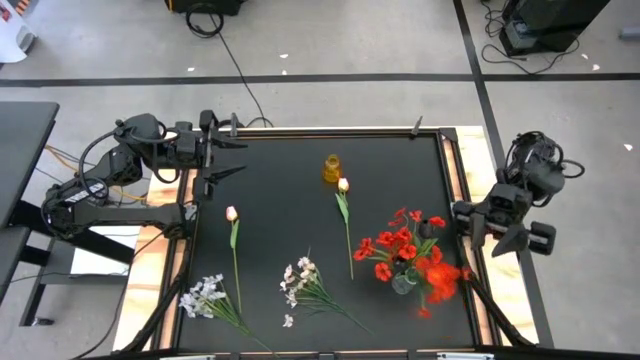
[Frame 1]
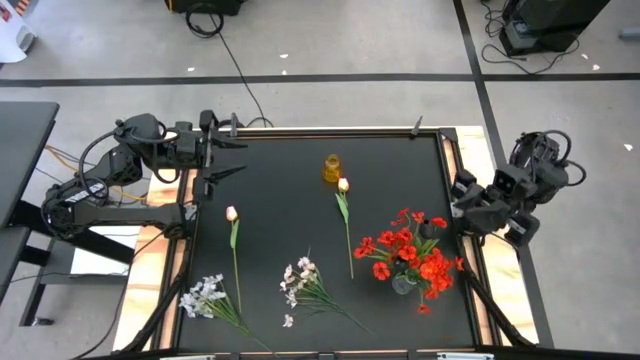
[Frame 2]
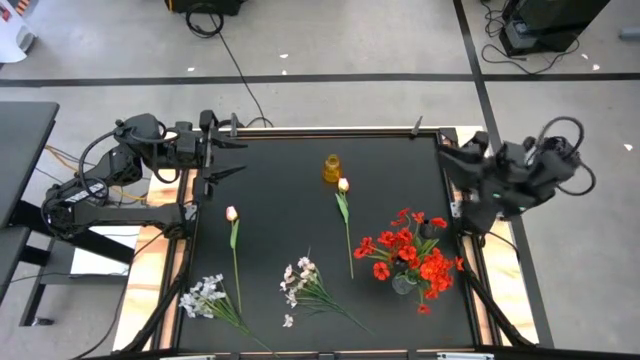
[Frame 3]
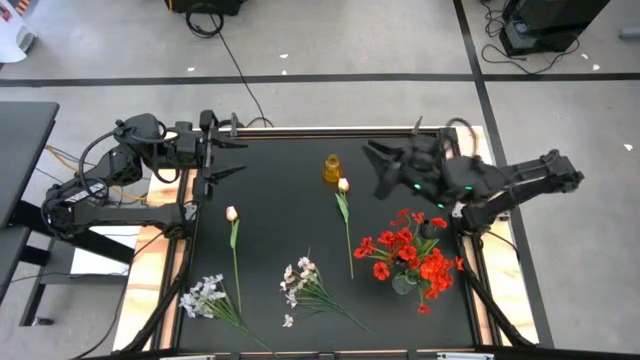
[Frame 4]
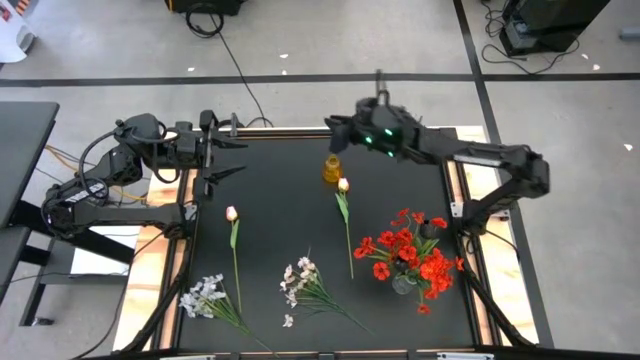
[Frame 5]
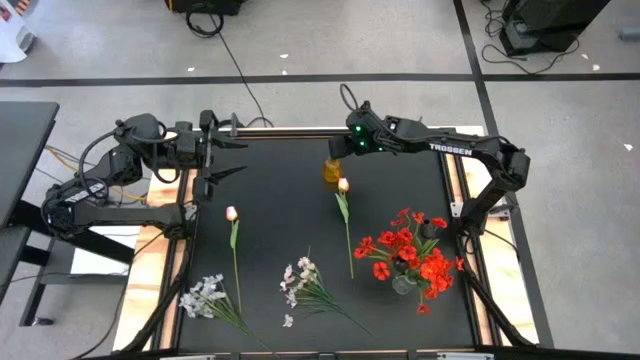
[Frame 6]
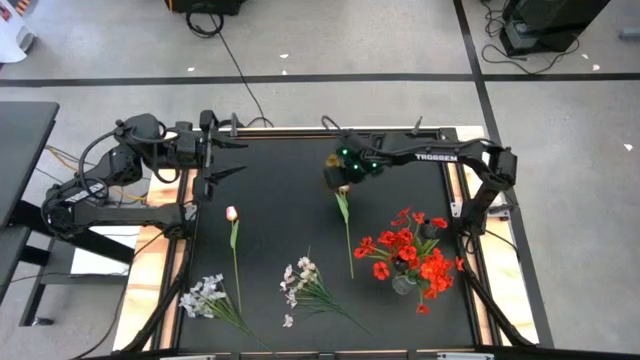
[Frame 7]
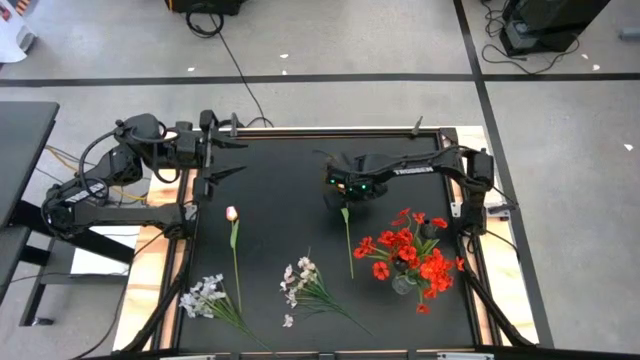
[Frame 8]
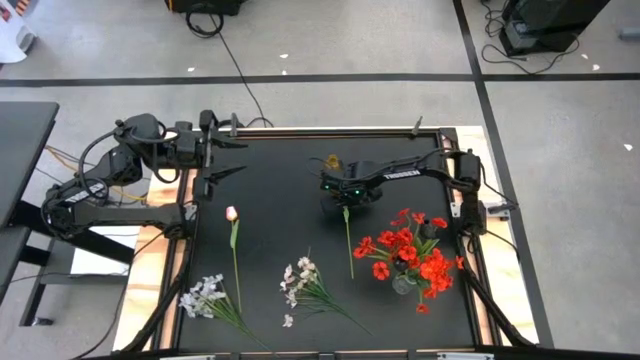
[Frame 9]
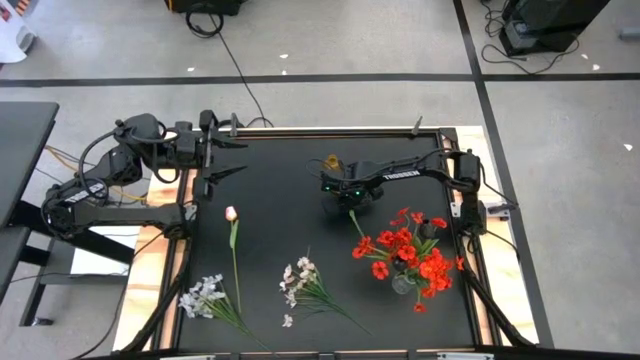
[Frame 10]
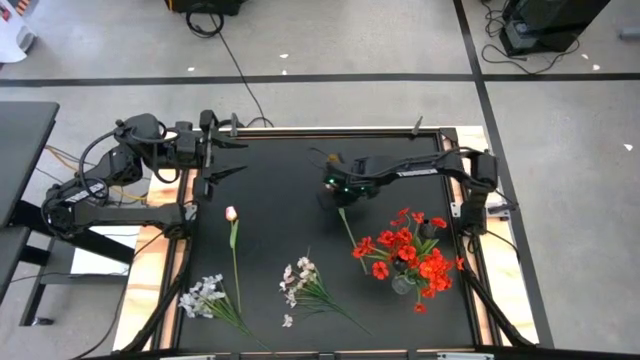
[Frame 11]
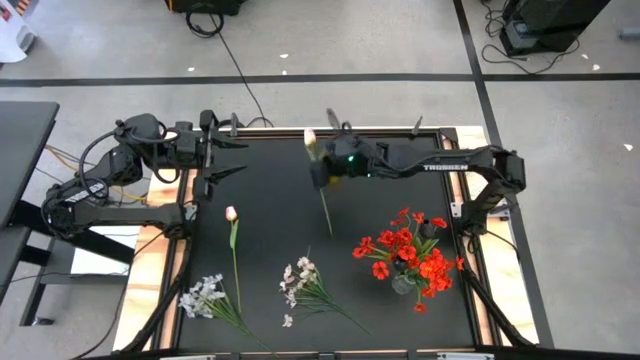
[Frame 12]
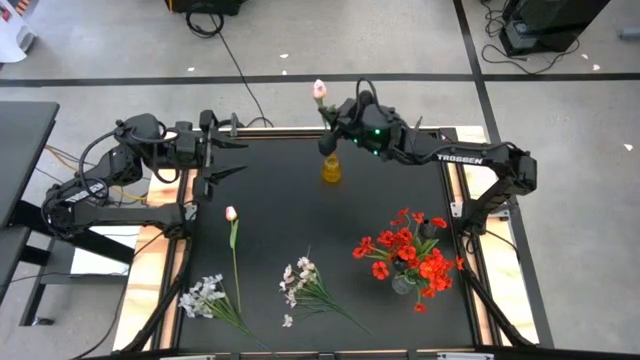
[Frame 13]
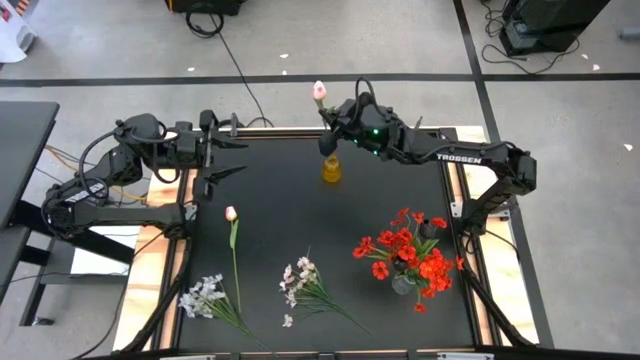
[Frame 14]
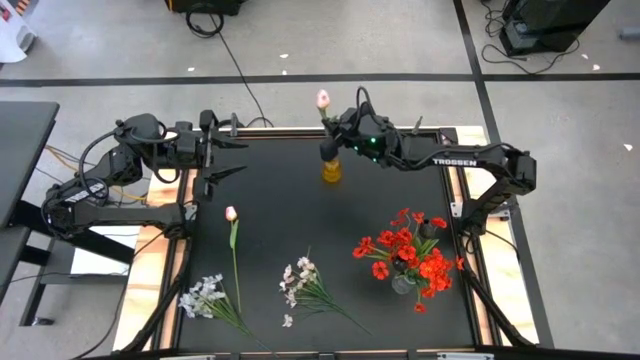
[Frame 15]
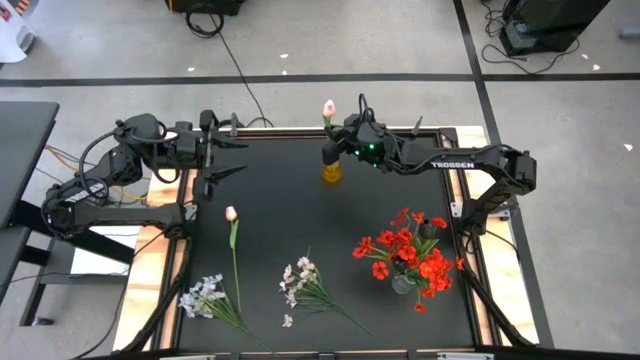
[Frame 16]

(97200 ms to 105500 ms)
Task: Sort flowers into vase by color
Put the right pink flower into the yellow vase

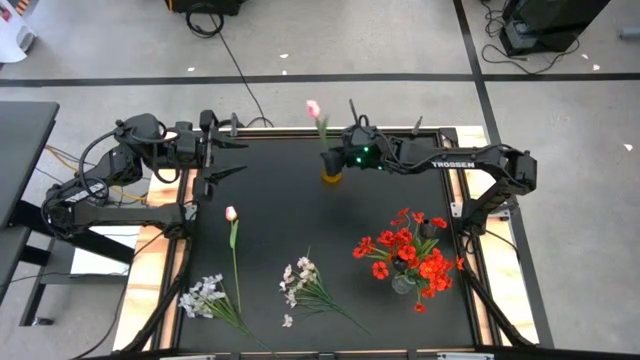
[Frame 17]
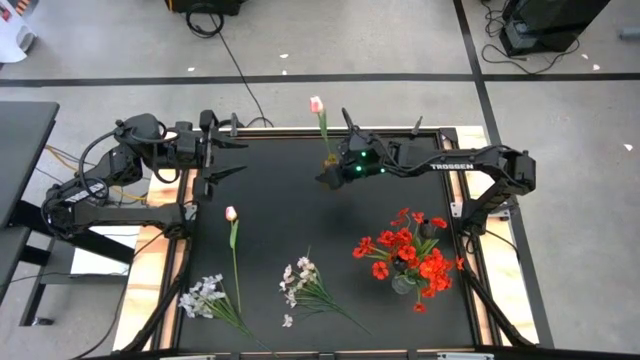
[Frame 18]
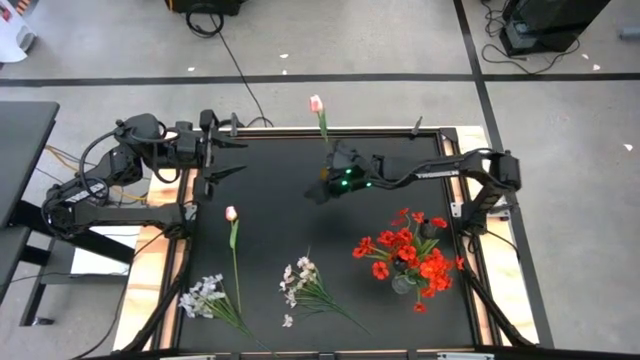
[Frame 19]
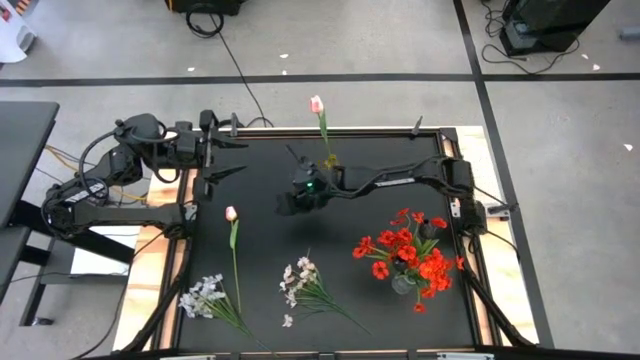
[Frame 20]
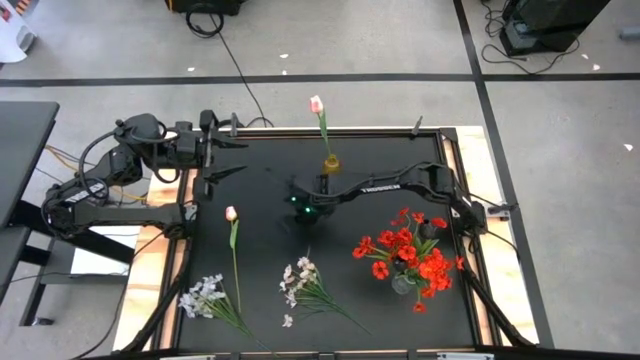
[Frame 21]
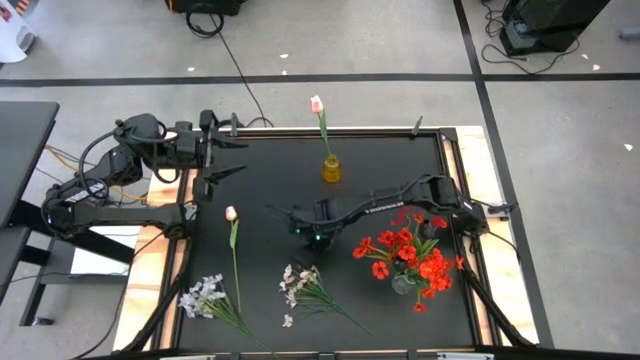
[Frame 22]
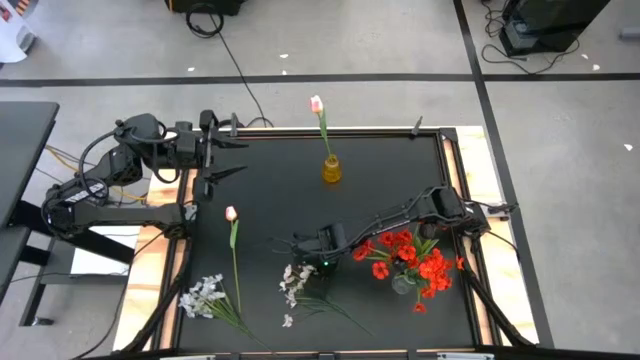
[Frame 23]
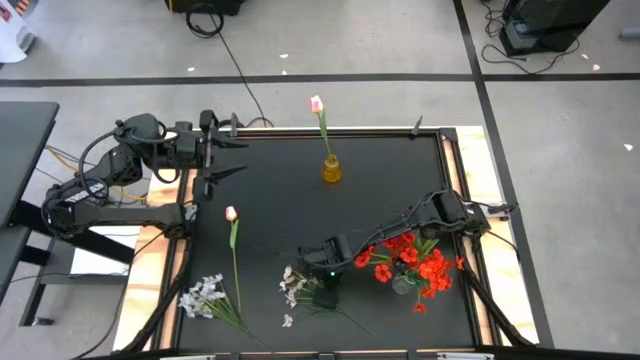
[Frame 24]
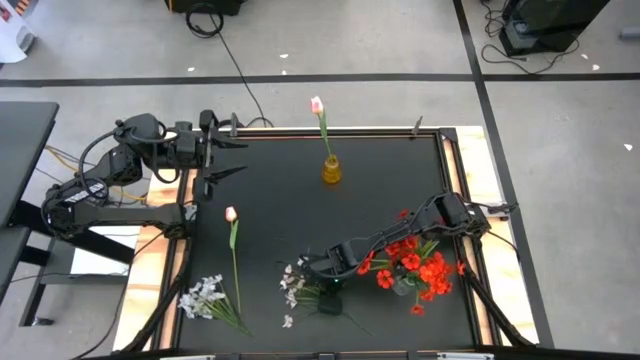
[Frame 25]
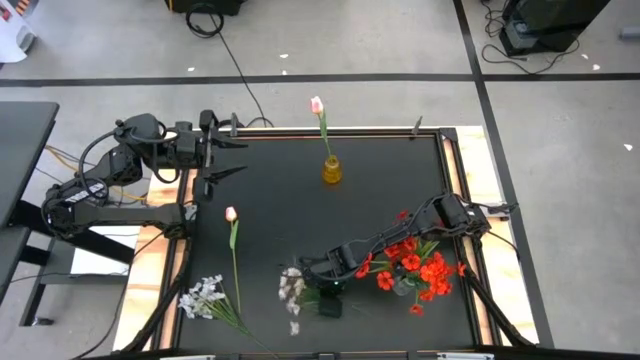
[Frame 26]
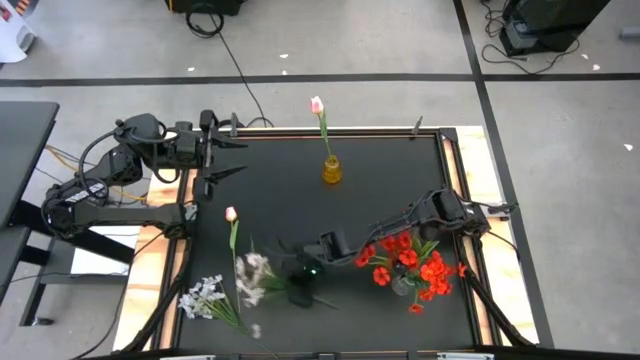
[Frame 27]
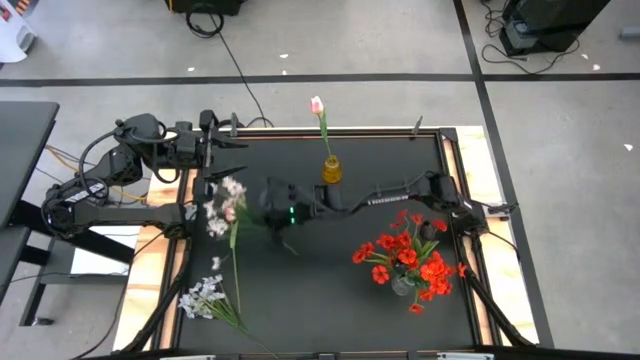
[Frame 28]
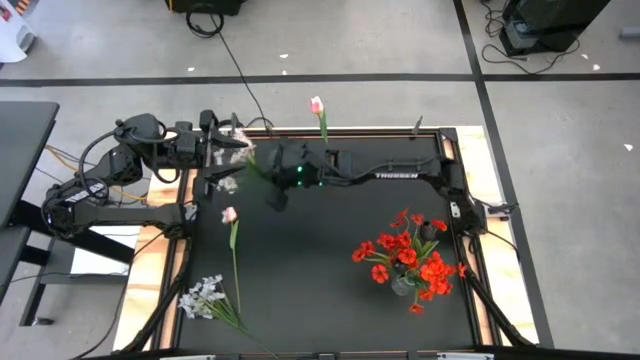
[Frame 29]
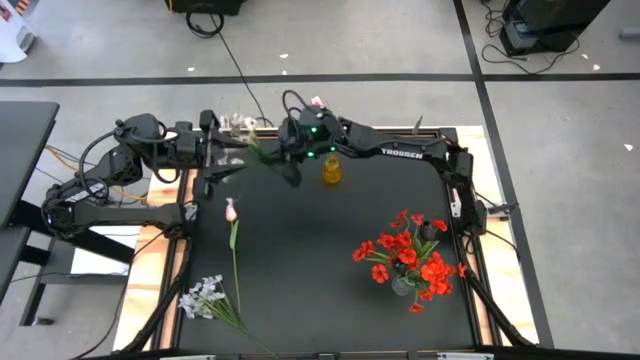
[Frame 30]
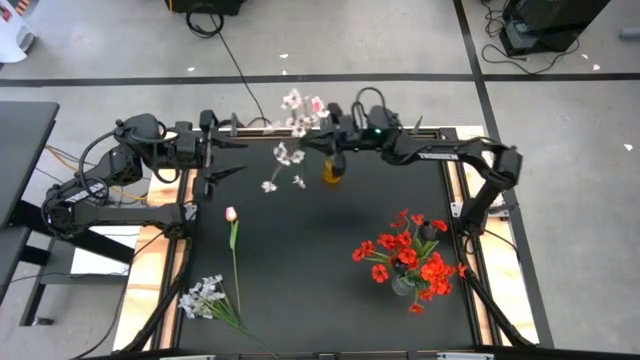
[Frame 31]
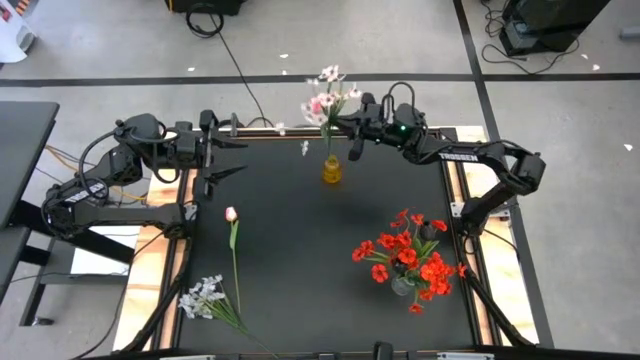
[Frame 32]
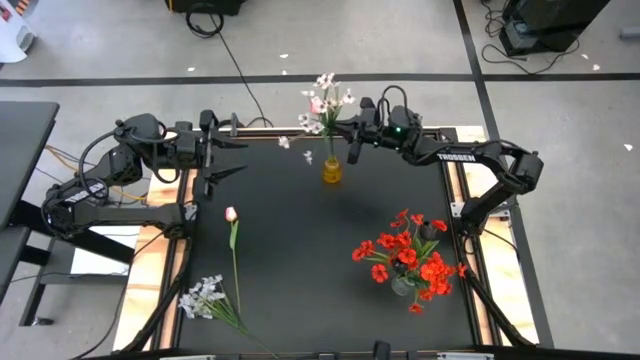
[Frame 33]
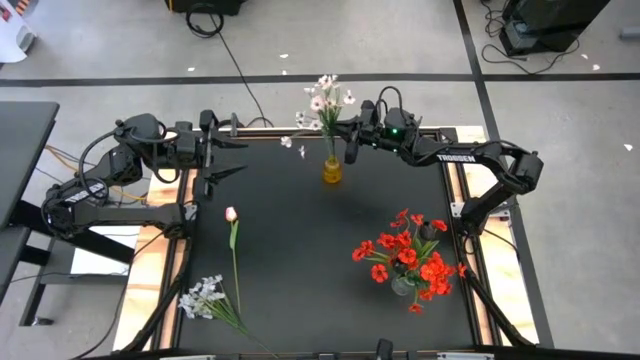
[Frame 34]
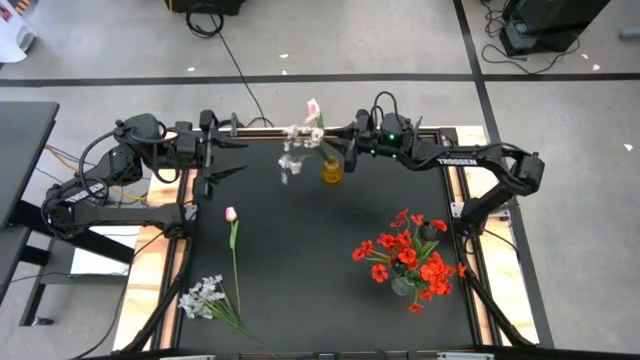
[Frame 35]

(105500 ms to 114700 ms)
Put the right white flowers into the yellow vase

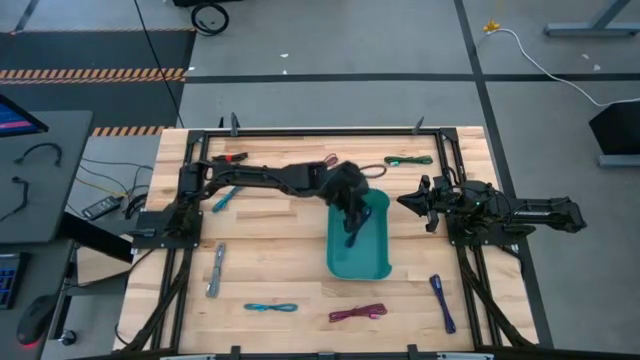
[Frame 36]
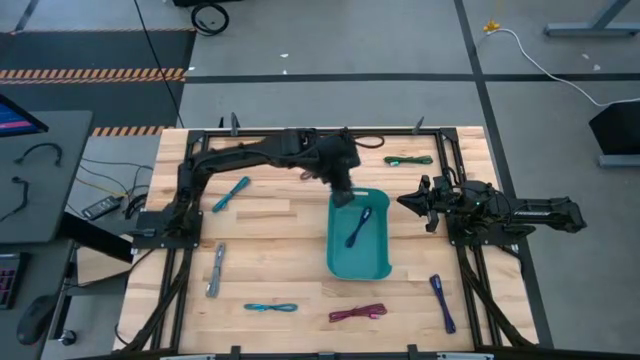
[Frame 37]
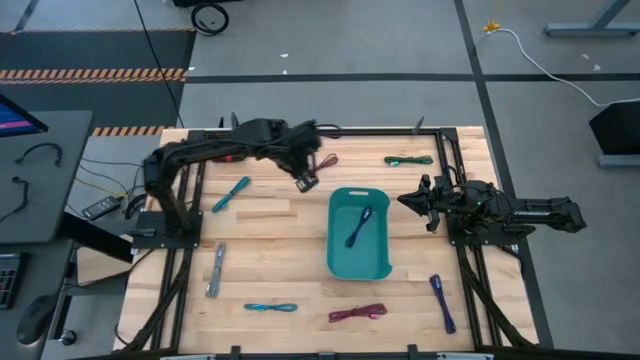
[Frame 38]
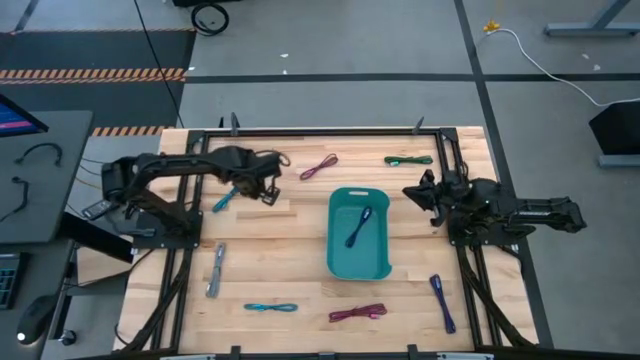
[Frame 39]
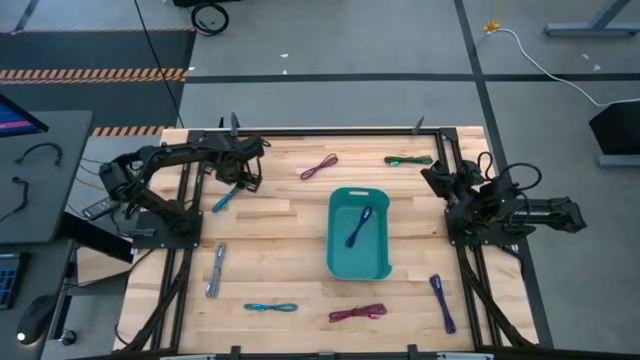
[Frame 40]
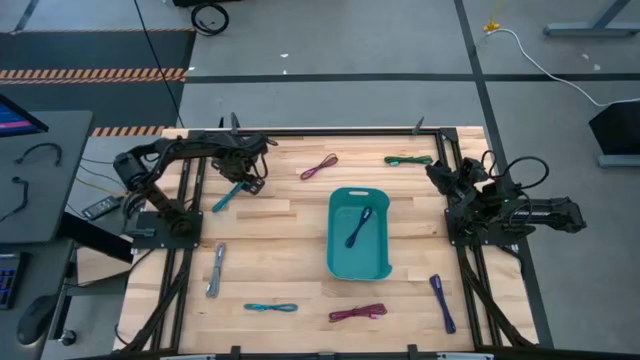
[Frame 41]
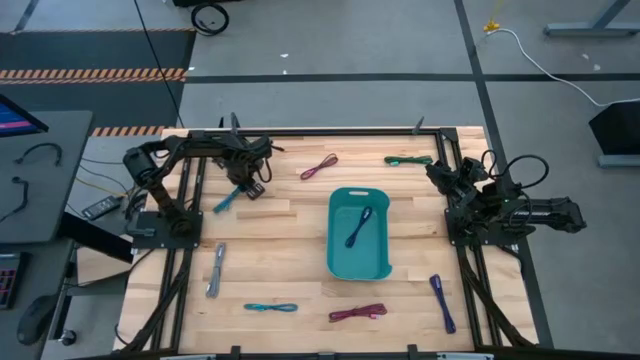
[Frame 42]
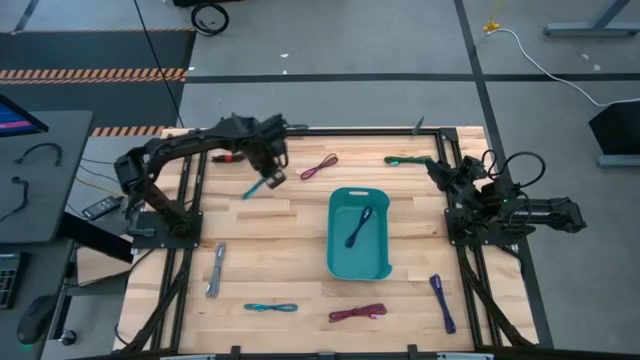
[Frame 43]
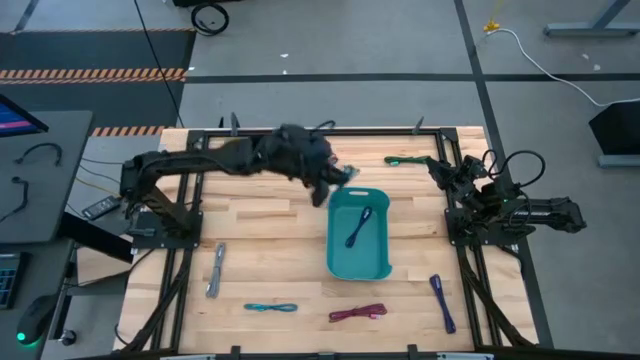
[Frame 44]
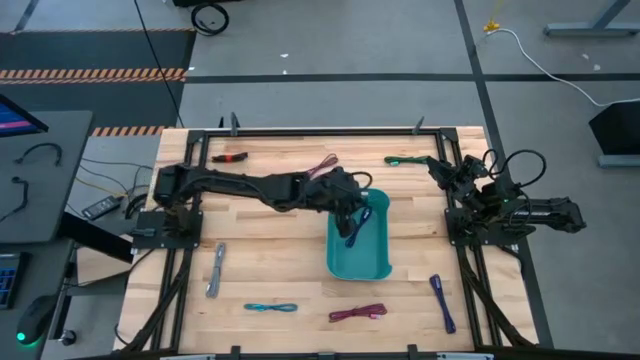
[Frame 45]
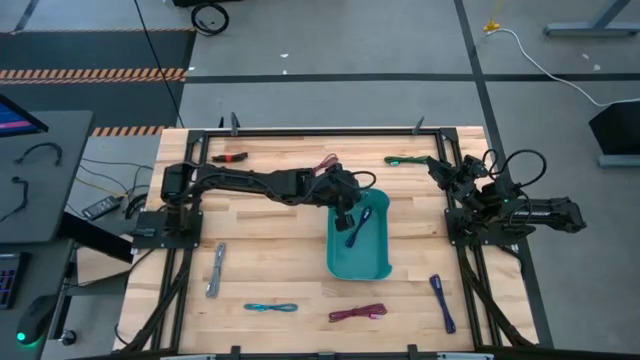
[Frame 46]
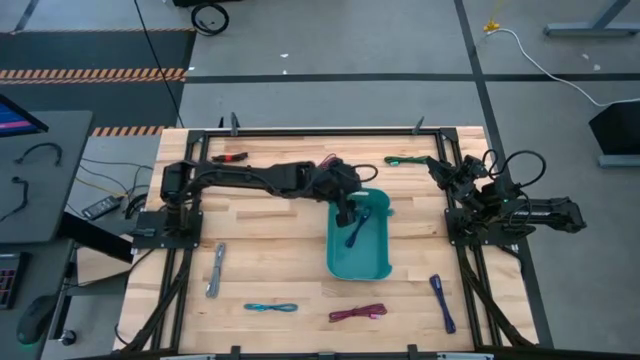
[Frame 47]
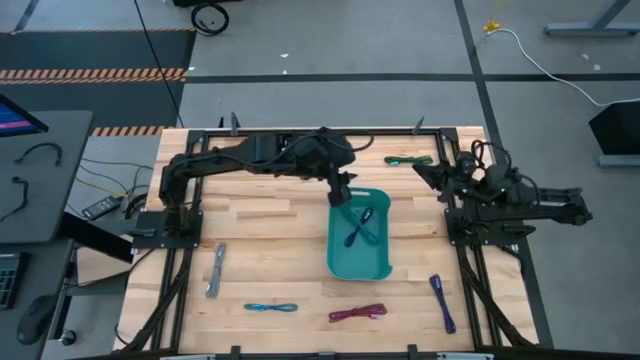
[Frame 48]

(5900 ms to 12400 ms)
Task: Pick and place USB-C Cables
Put the top light blue USB cable into the light green bin
